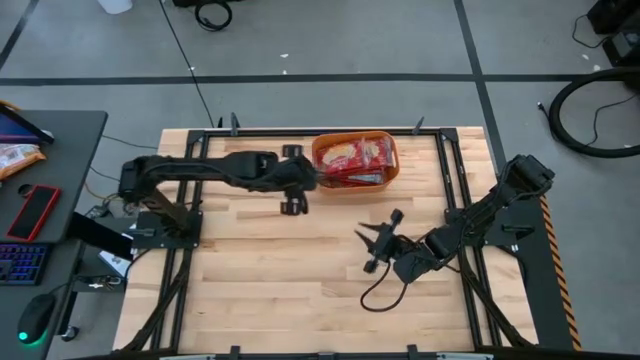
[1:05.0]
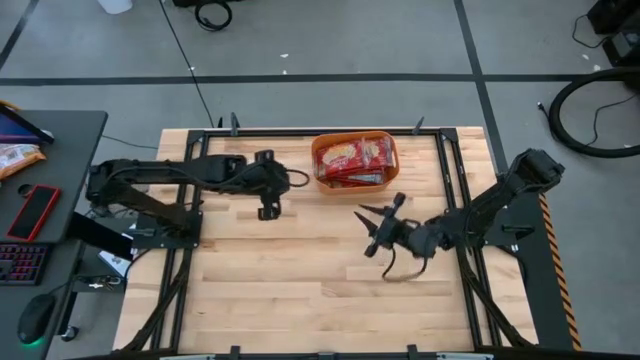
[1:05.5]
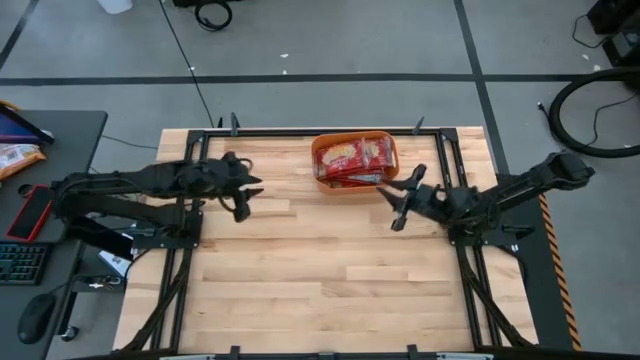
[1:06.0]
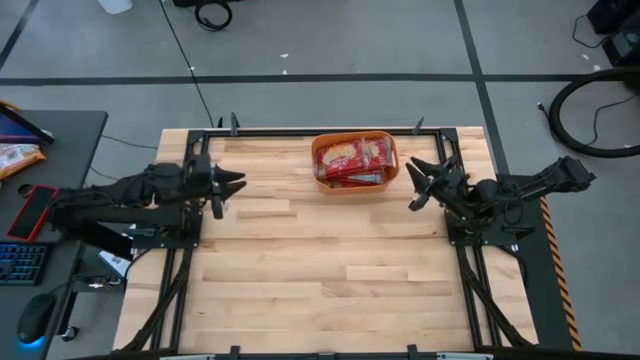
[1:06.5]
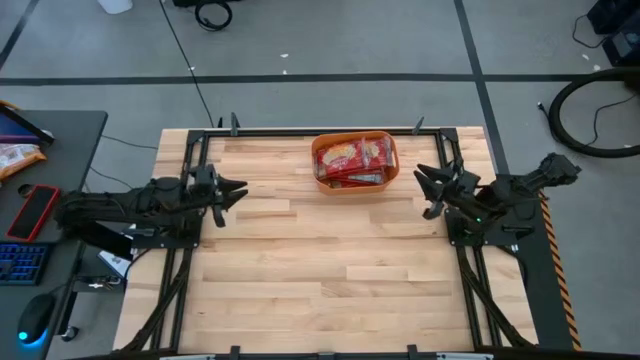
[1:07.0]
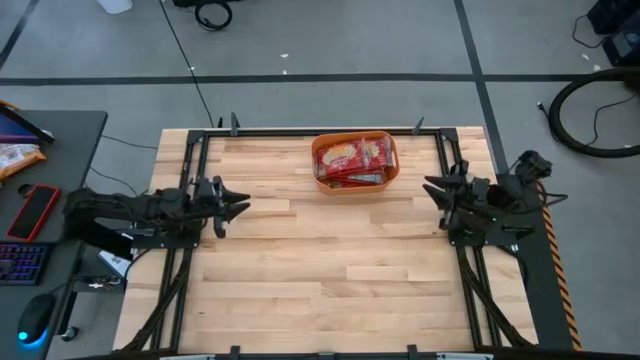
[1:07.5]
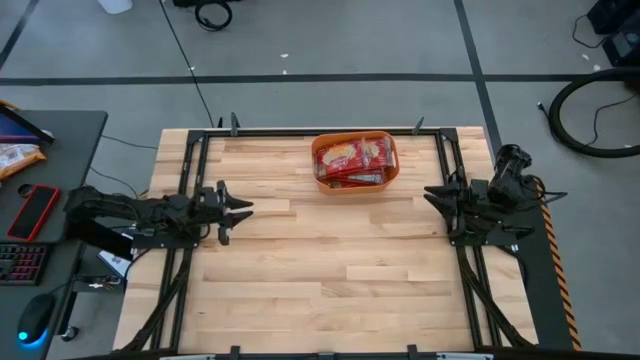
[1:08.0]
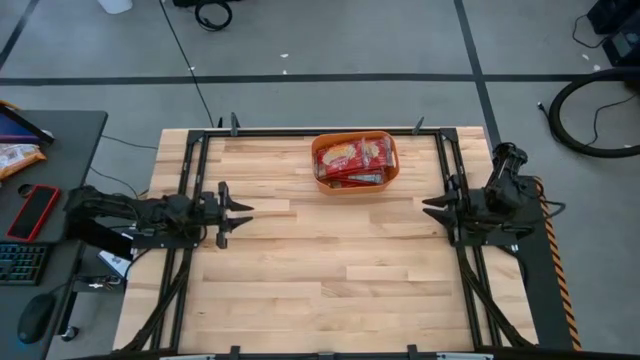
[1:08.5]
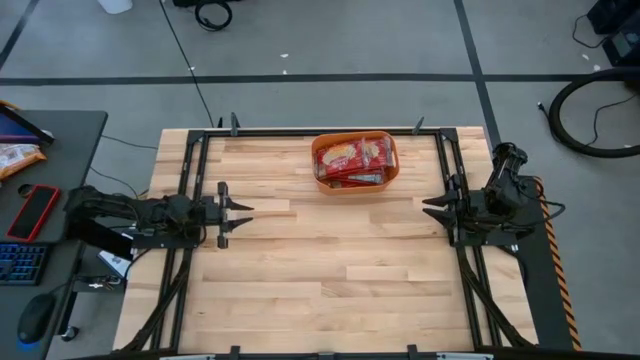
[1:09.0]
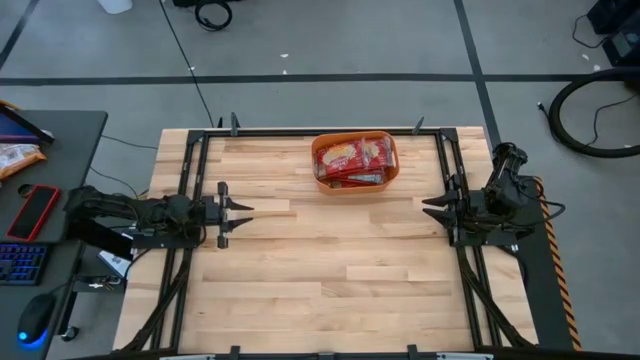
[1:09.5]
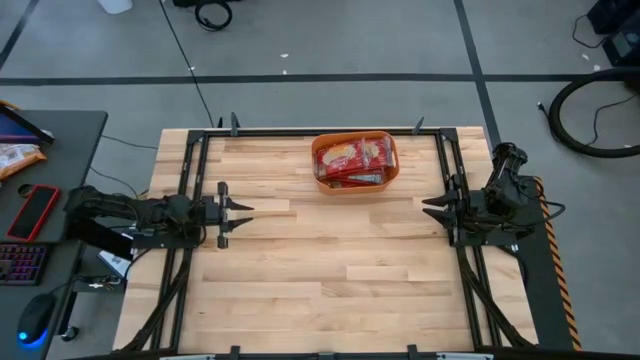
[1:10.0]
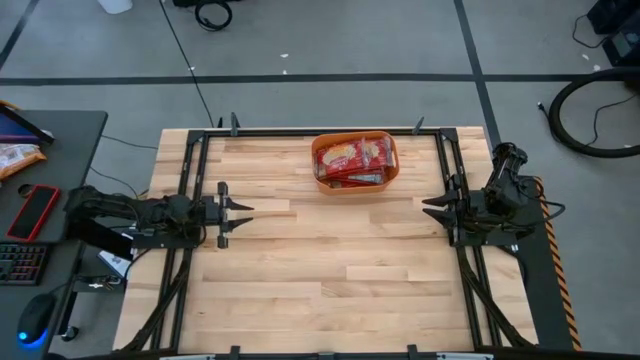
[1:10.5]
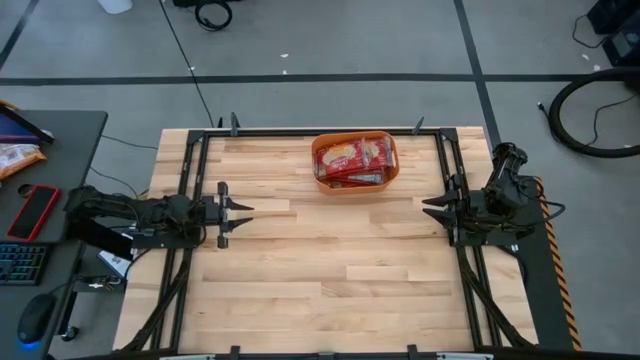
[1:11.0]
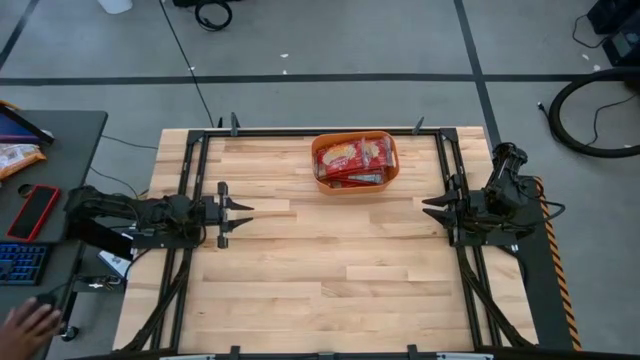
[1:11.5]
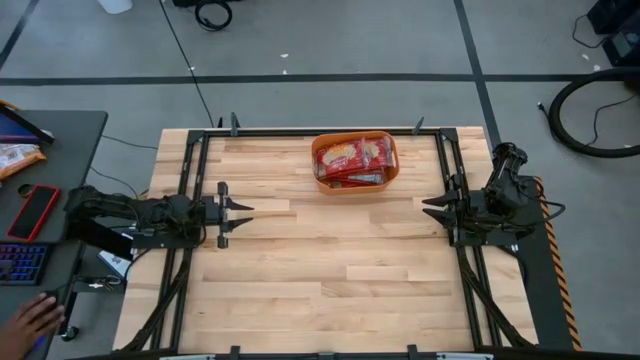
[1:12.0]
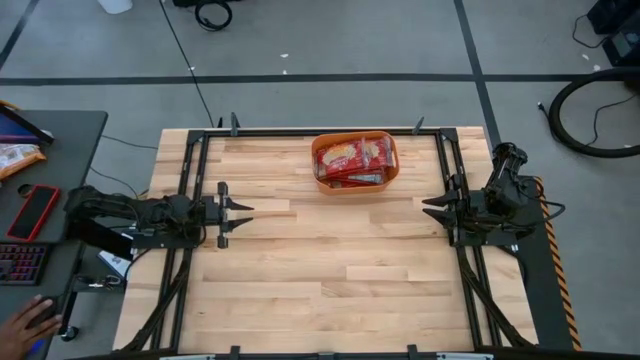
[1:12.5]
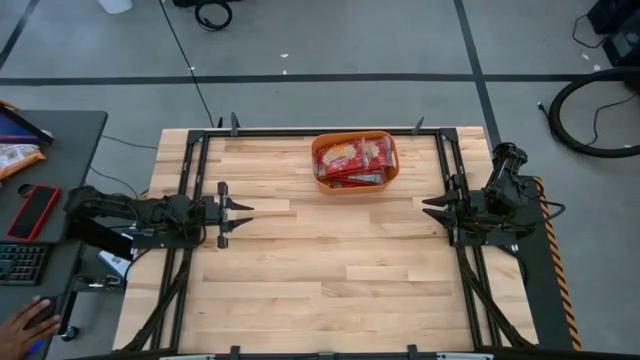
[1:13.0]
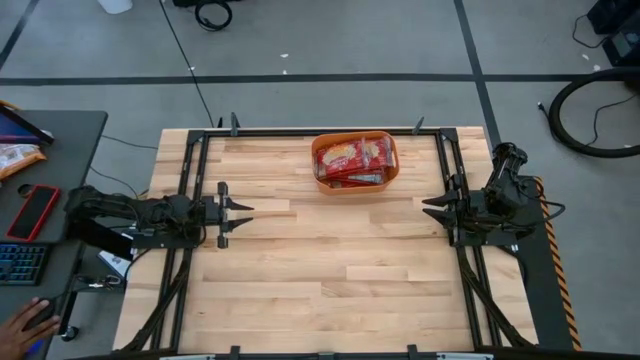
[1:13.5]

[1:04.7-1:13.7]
Task: Sort popcorn bags into baskets
Return to Home Position

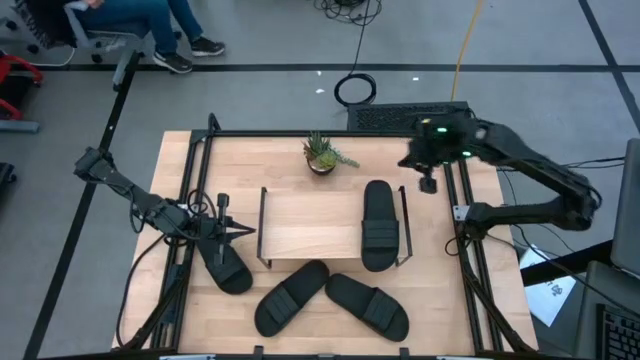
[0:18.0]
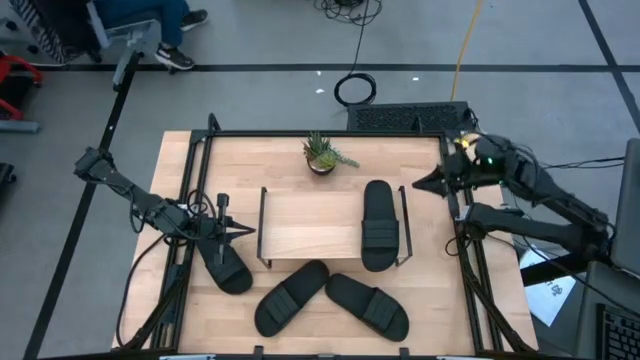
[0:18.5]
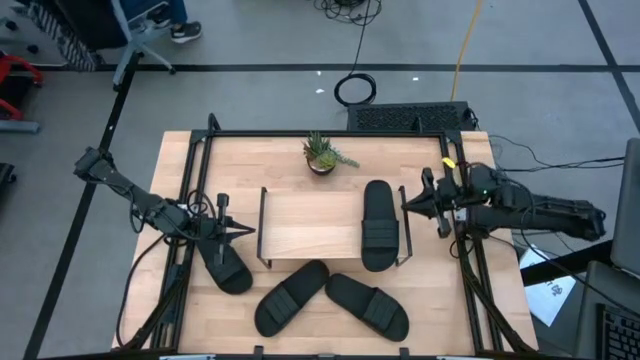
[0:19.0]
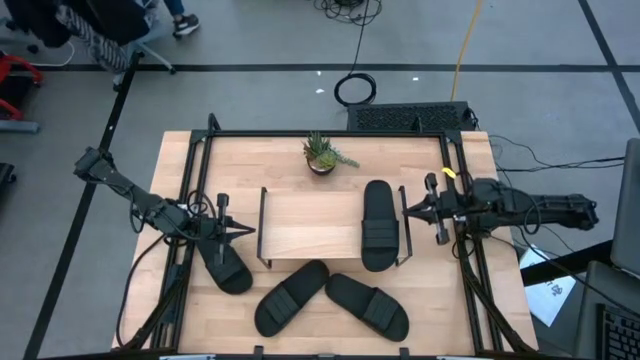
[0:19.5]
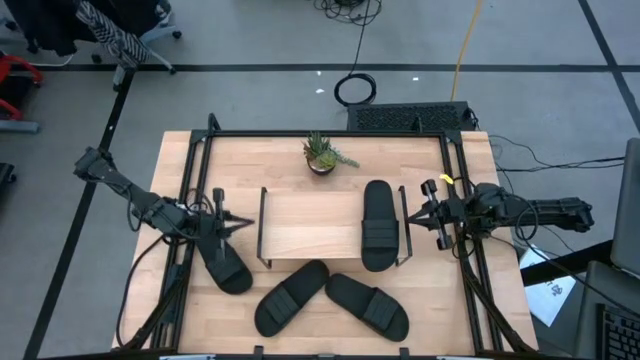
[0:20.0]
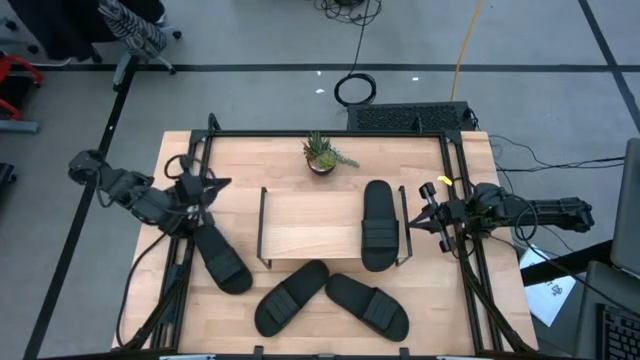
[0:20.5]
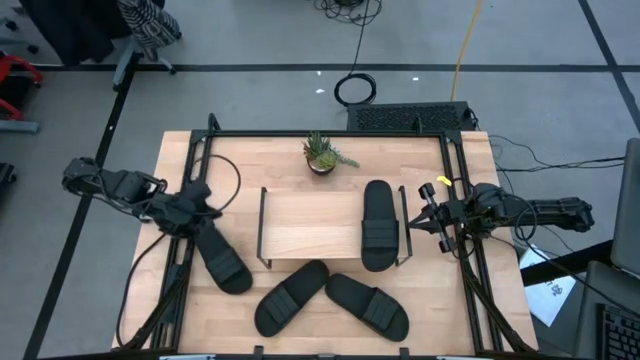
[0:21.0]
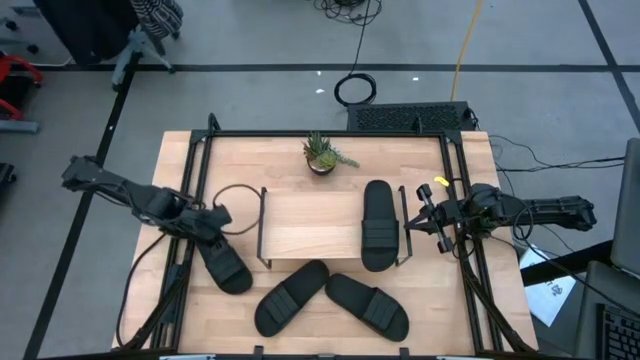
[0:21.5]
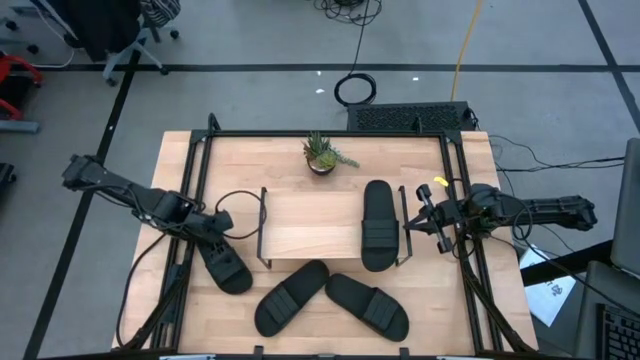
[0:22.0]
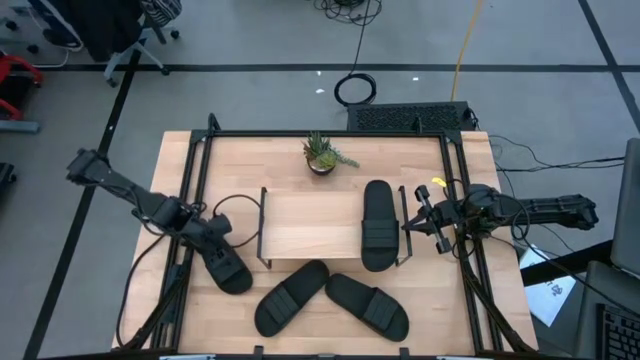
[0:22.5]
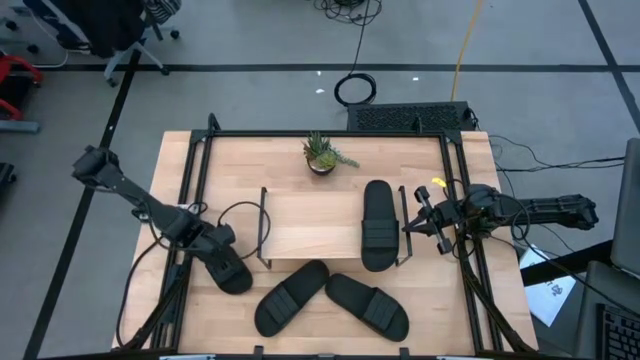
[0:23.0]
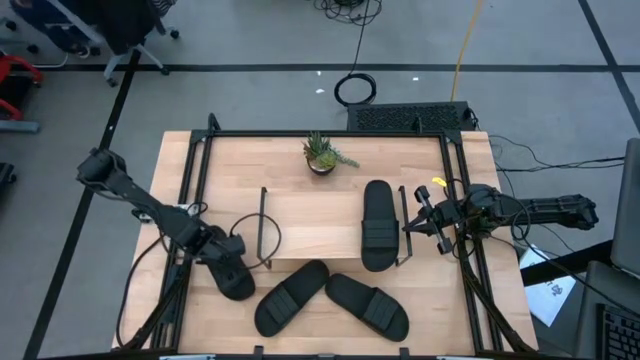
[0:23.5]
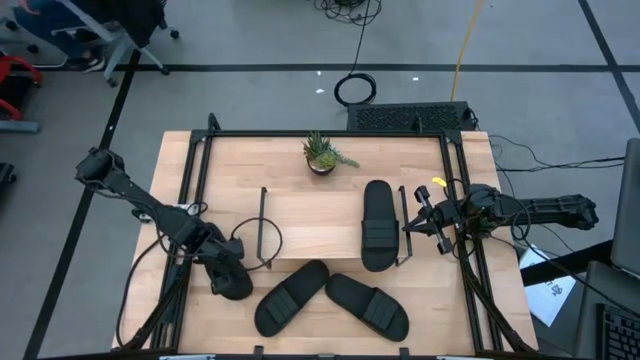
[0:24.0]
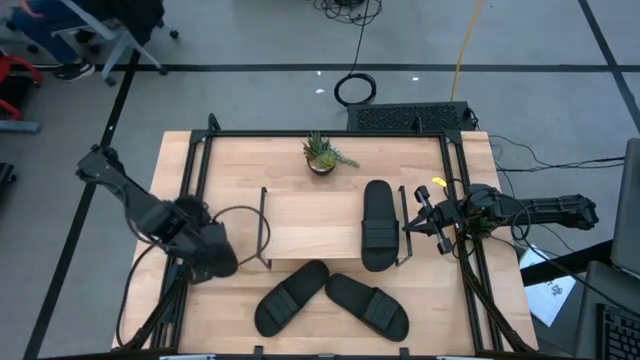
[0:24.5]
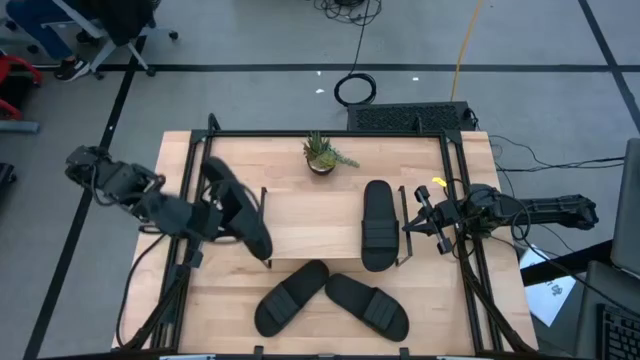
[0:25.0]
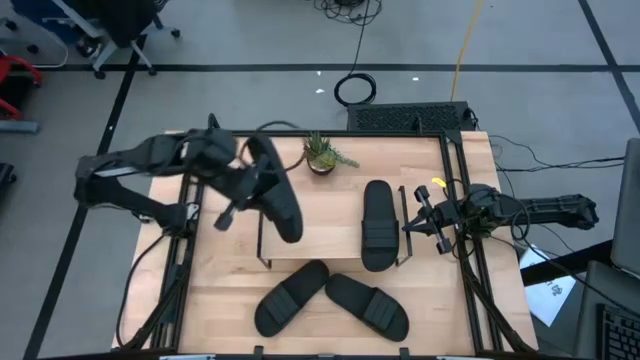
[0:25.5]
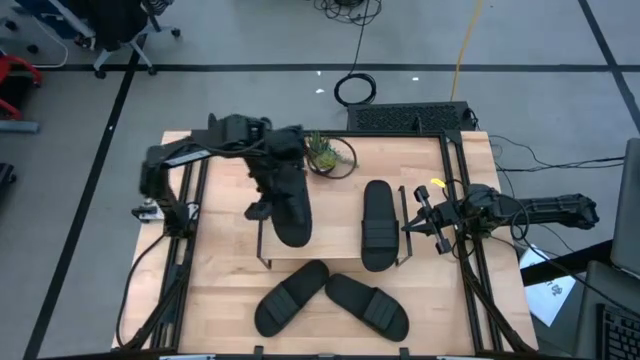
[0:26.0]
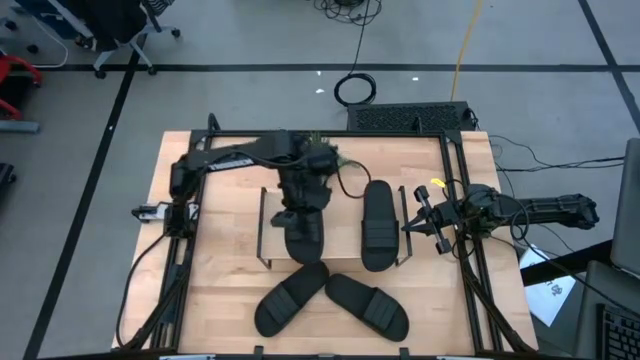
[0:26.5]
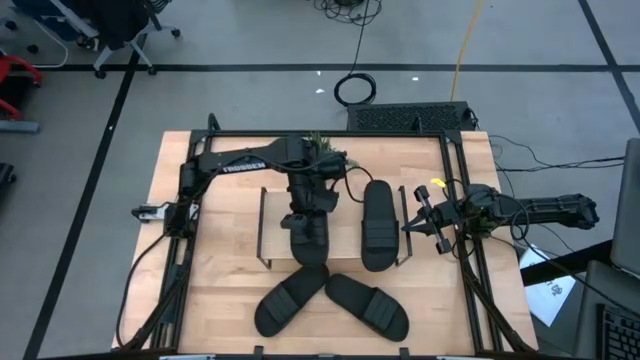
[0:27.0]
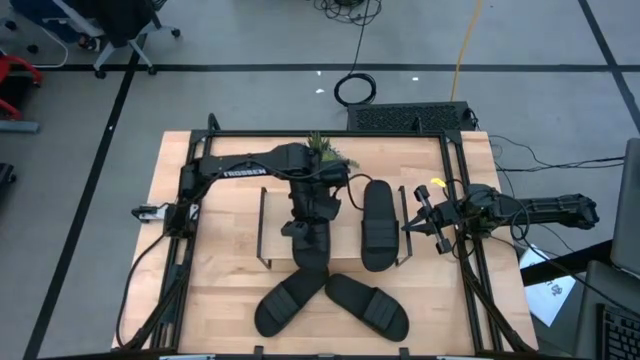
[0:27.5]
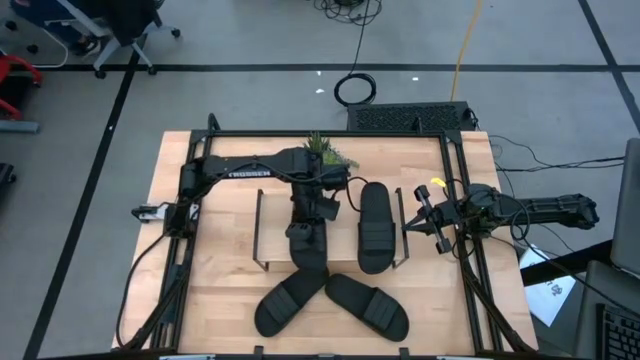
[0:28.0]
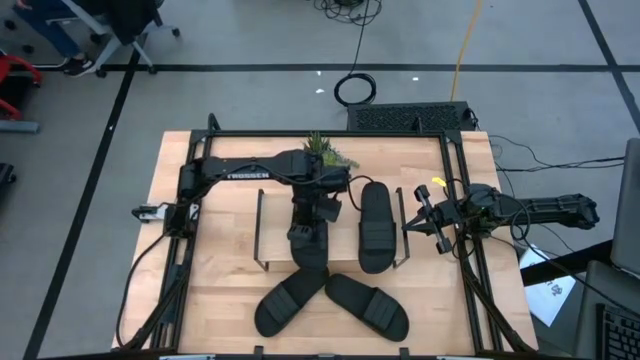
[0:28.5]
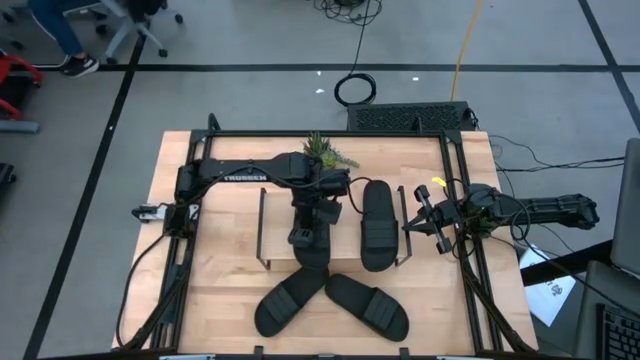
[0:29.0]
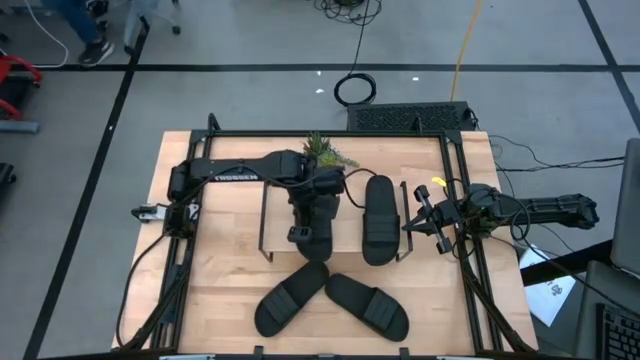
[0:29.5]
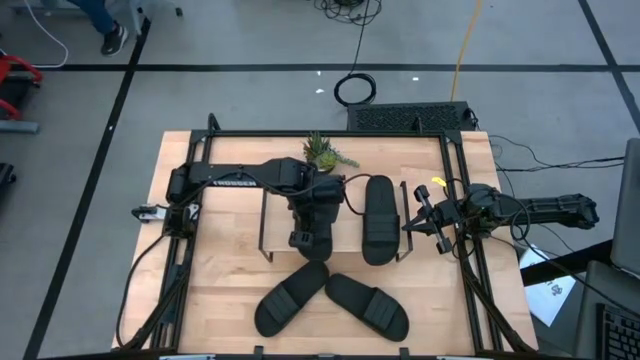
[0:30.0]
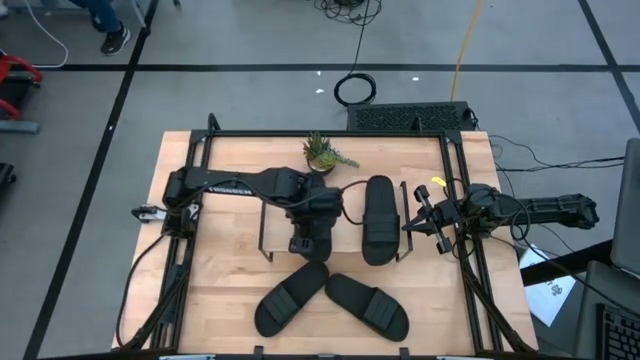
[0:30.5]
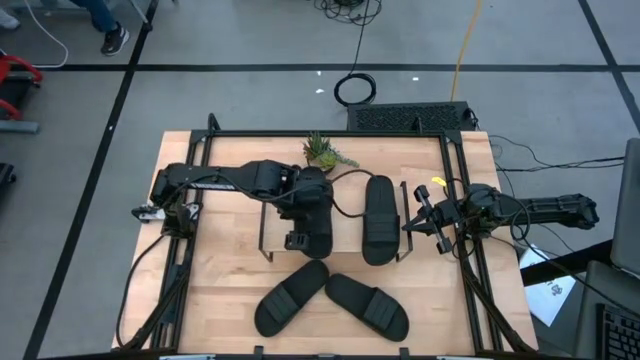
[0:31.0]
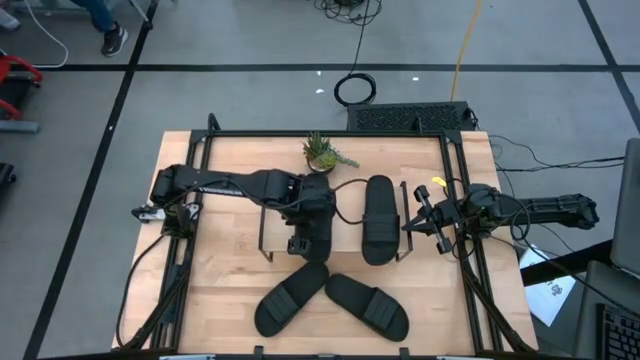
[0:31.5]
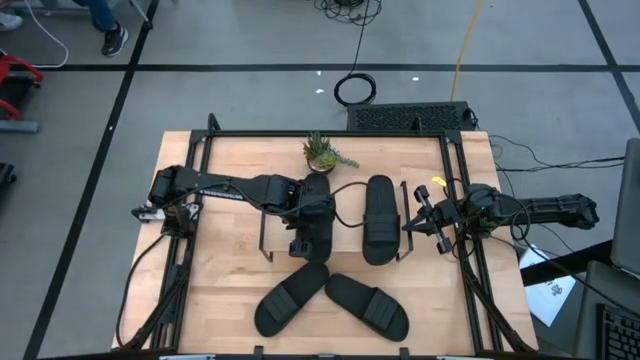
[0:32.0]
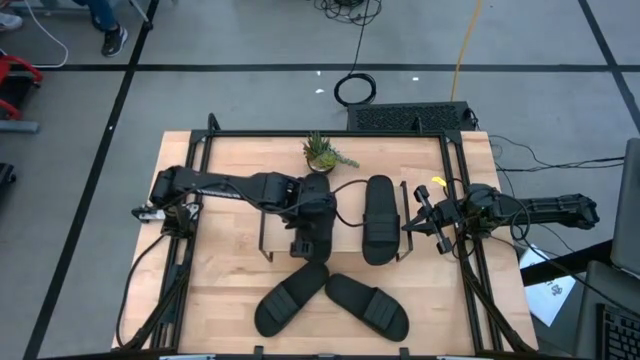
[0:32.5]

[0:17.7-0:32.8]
Task: Pick and place slides into the shelf
Put the black sandal on the shelf
